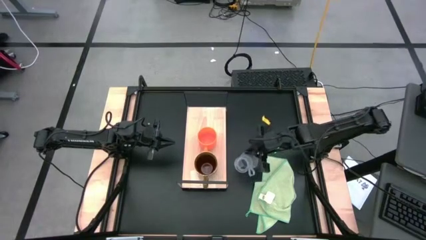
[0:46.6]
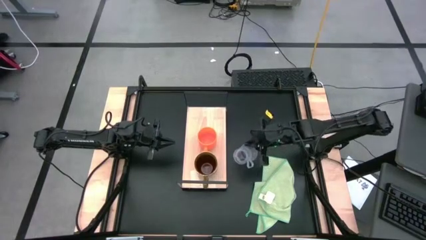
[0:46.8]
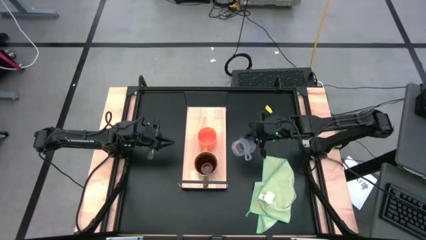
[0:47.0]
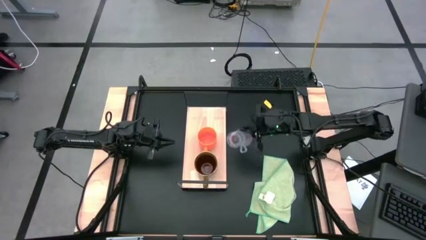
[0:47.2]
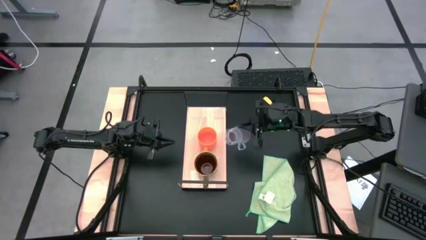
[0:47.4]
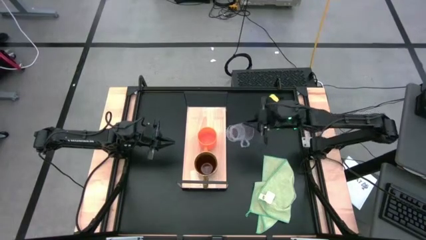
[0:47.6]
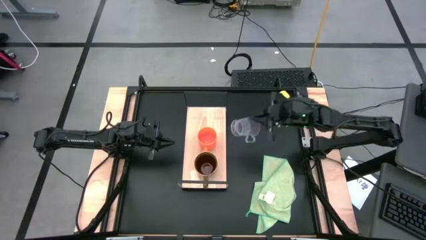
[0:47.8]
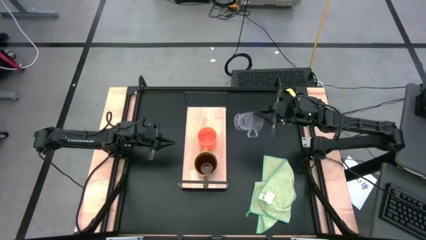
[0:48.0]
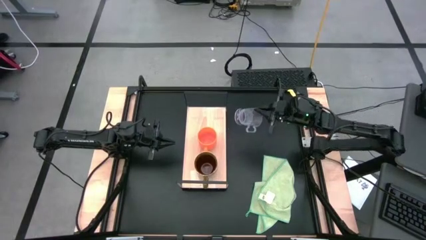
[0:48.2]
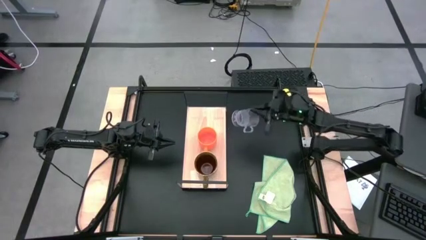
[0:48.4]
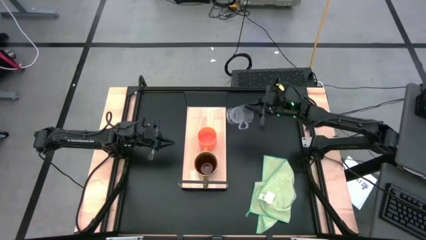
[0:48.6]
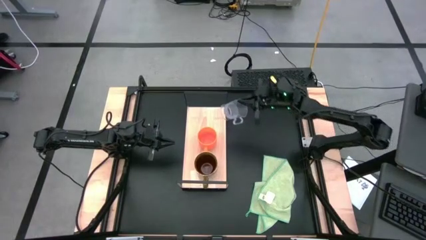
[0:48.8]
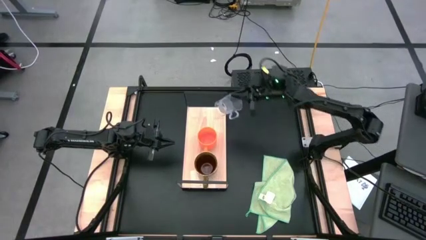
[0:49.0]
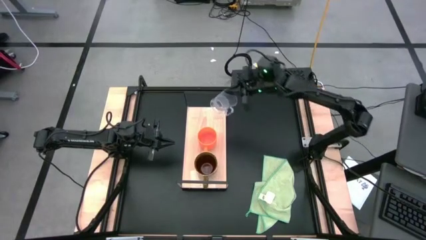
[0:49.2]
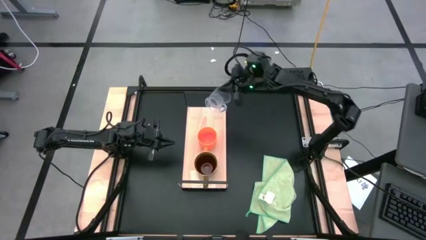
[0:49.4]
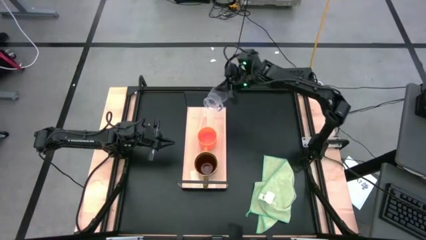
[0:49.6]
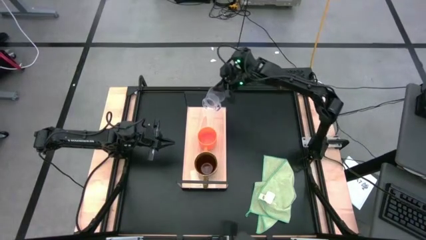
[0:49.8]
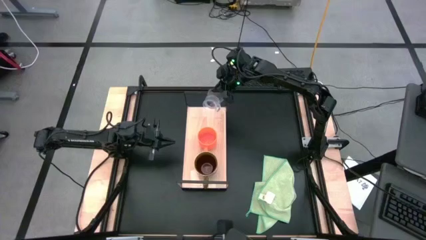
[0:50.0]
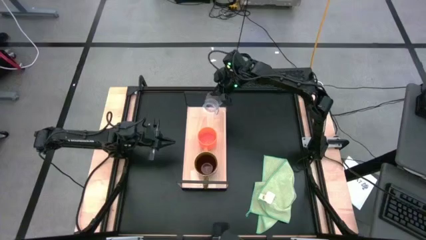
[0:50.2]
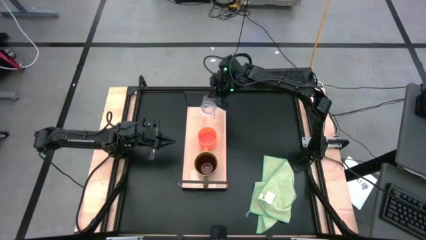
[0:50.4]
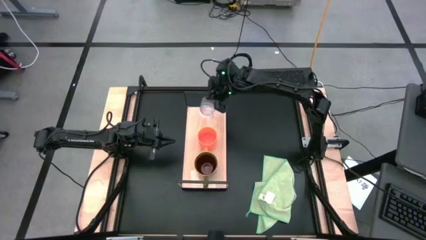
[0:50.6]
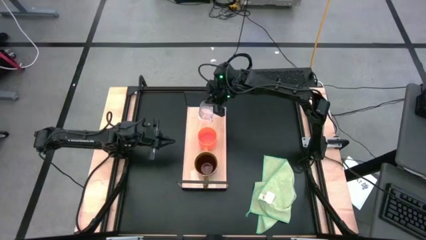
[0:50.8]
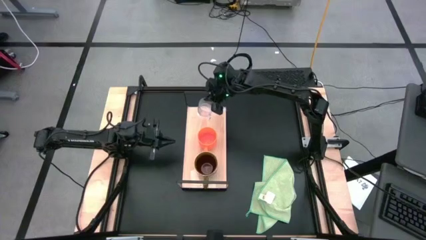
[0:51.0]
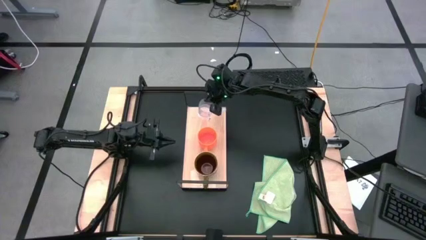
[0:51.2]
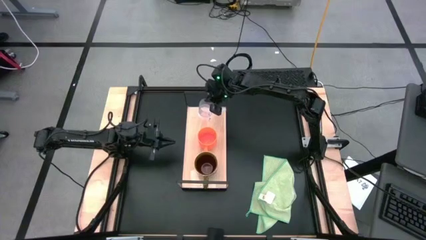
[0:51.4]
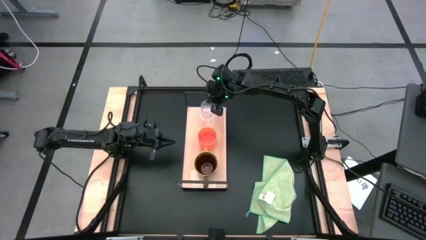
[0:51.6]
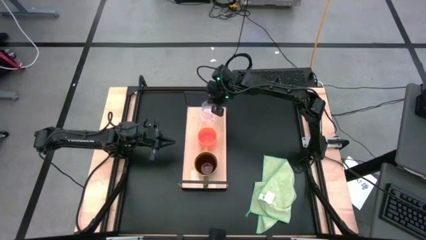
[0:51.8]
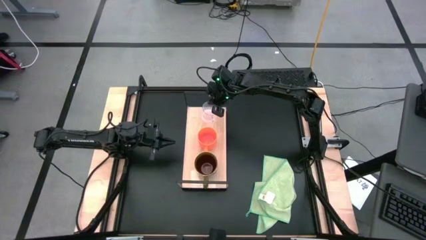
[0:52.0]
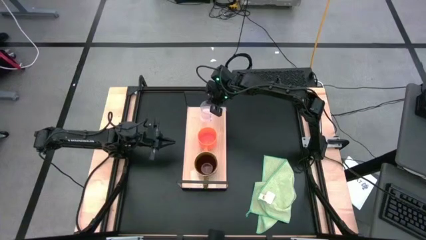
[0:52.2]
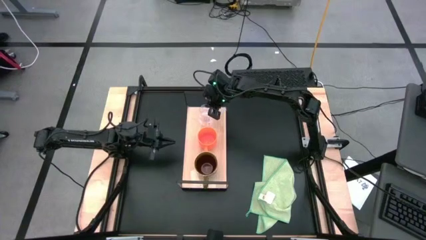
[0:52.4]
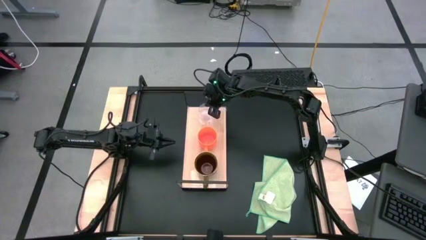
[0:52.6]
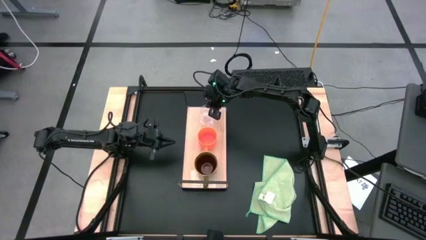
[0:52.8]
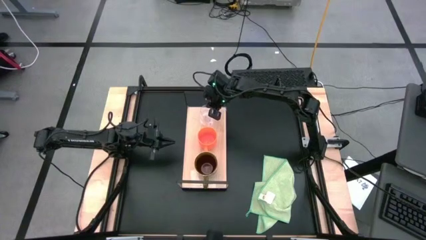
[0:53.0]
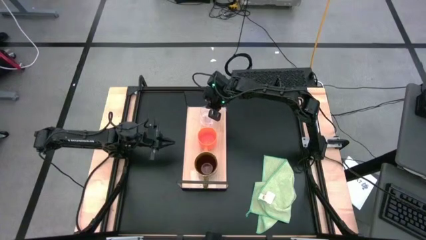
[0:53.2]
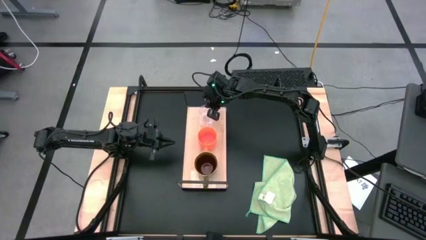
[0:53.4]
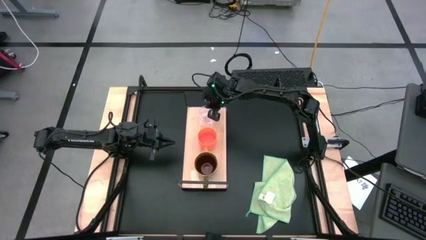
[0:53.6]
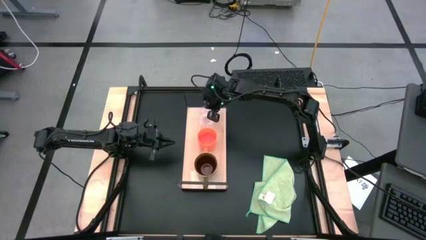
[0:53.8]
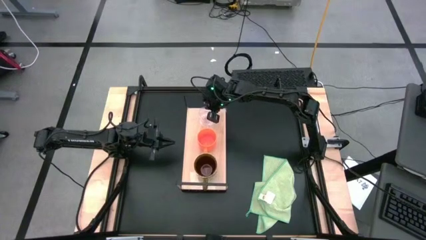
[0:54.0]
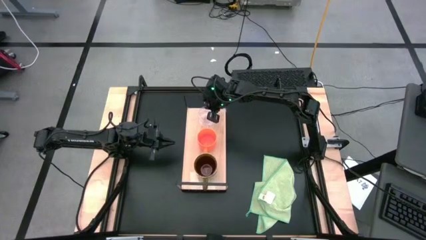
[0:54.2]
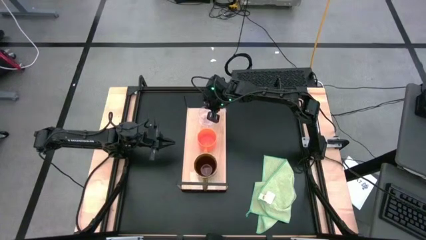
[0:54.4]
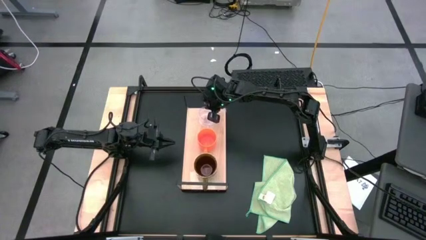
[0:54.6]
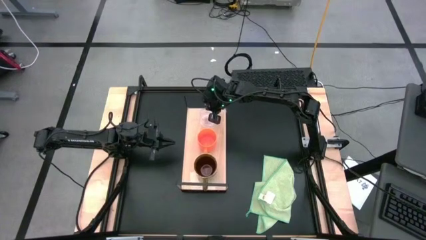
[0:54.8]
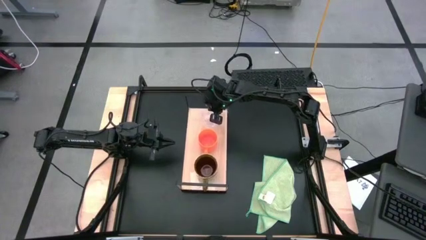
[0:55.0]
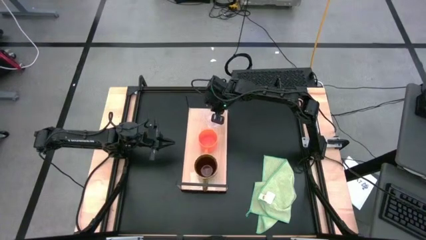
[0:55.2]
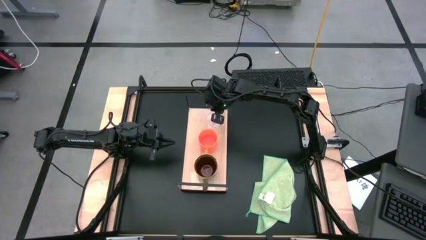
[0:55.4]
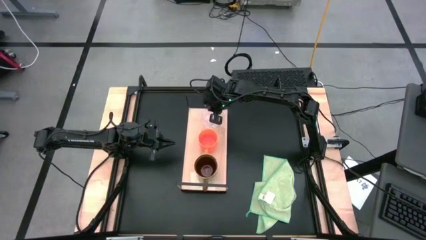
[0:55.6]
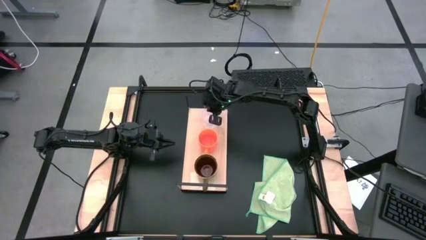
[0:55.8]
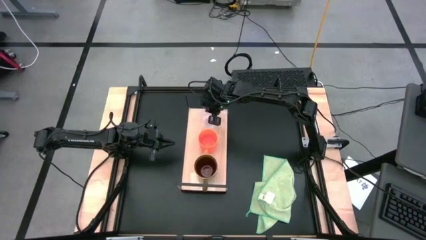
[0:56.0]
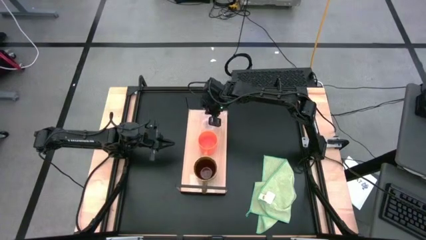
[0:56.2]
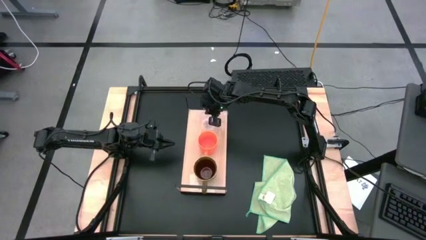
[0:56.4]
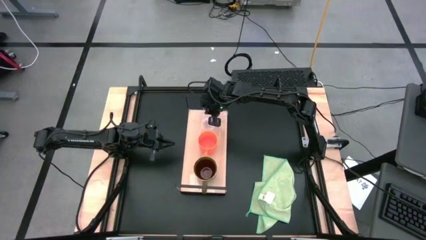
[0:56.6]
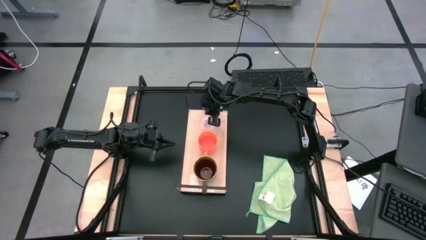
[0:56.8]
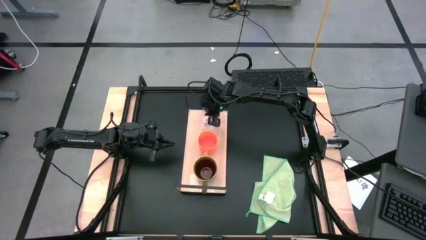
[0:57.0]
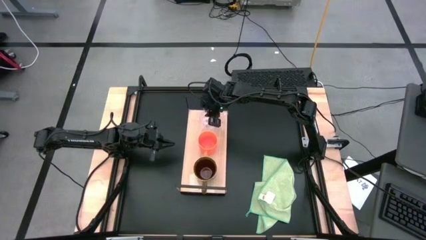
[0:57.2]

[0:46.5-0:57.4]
Task: Stack small to large cups/mugs on shelf
Put the transparent mug on the shelf

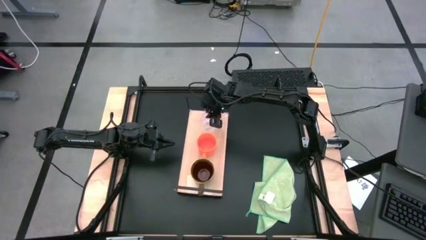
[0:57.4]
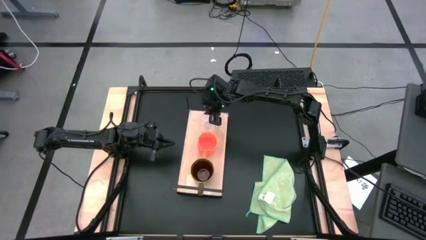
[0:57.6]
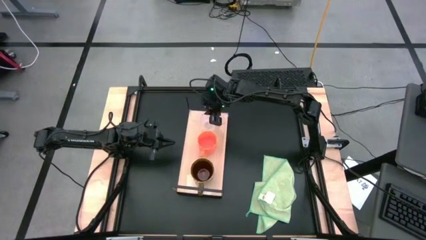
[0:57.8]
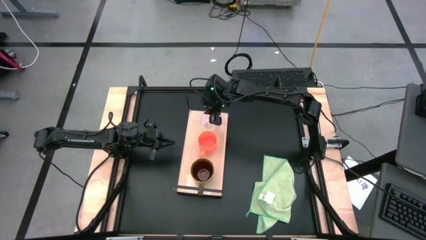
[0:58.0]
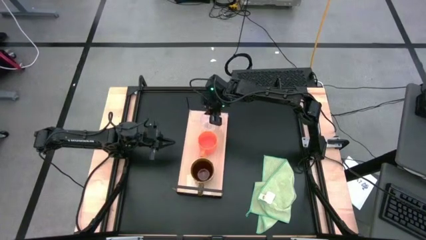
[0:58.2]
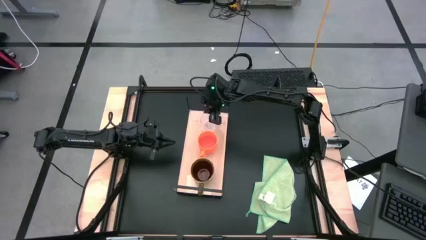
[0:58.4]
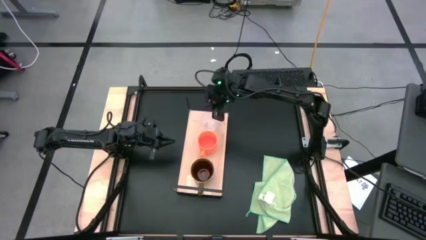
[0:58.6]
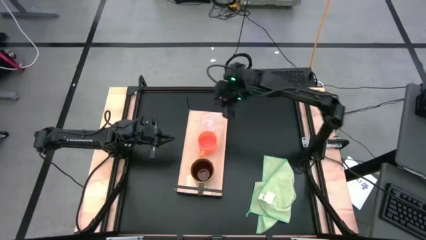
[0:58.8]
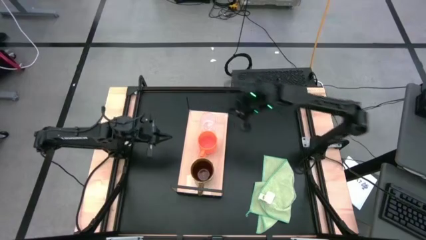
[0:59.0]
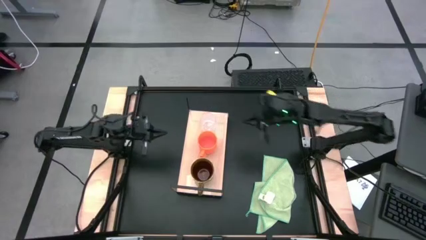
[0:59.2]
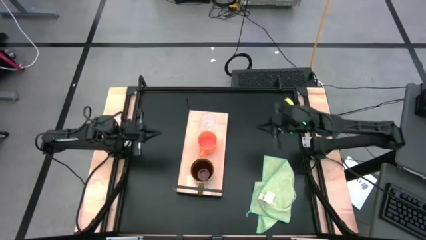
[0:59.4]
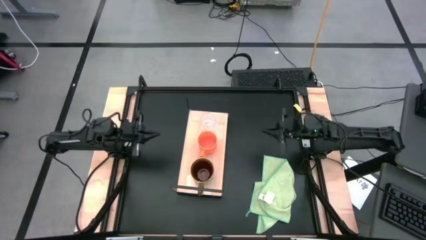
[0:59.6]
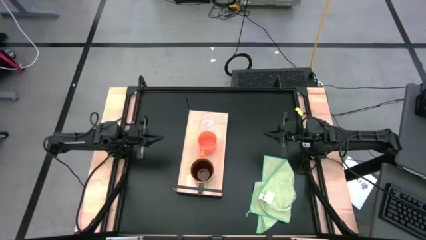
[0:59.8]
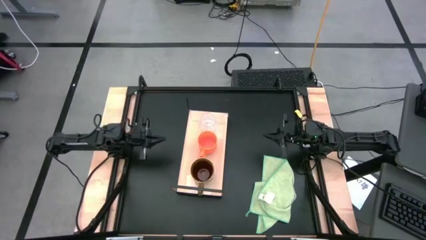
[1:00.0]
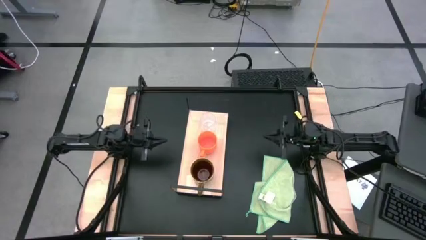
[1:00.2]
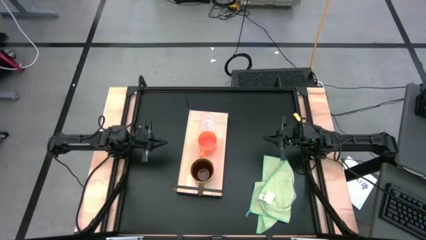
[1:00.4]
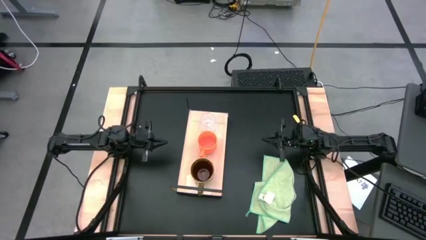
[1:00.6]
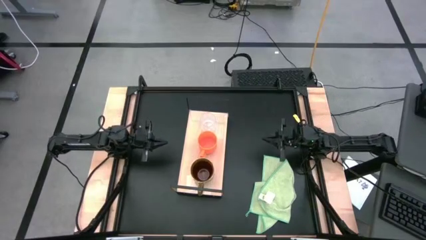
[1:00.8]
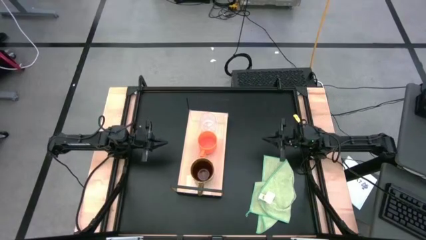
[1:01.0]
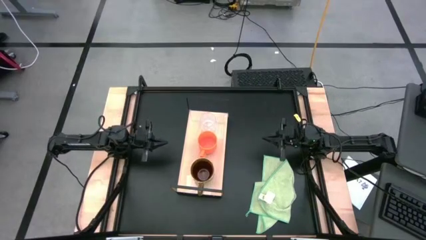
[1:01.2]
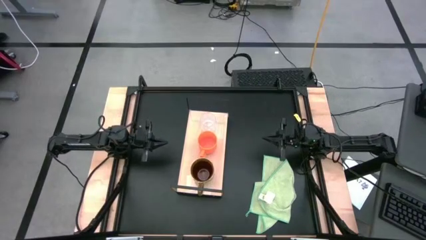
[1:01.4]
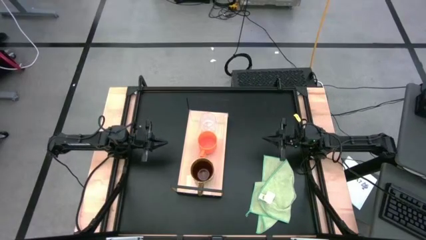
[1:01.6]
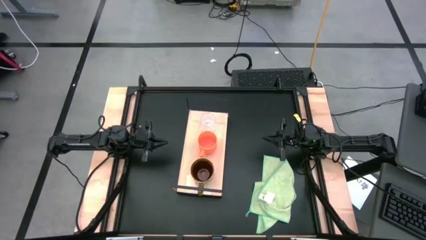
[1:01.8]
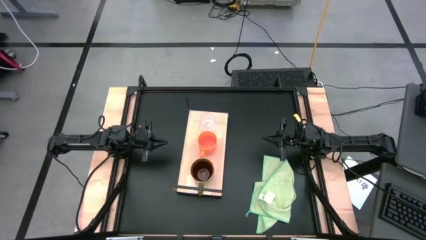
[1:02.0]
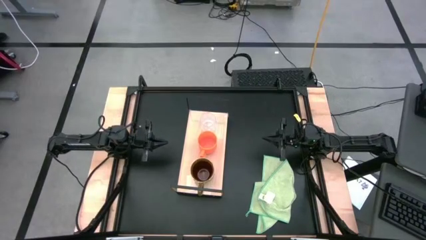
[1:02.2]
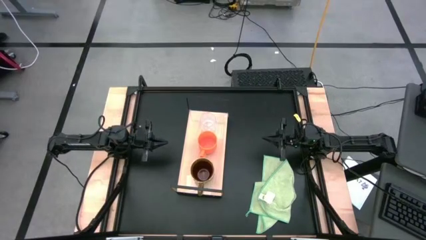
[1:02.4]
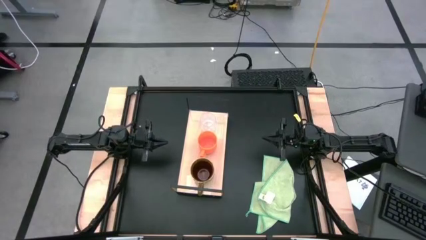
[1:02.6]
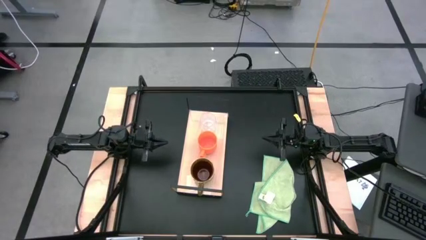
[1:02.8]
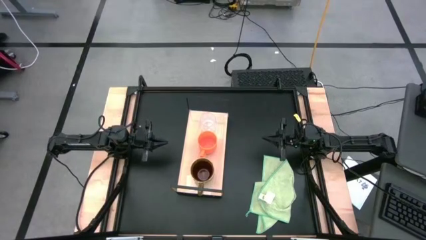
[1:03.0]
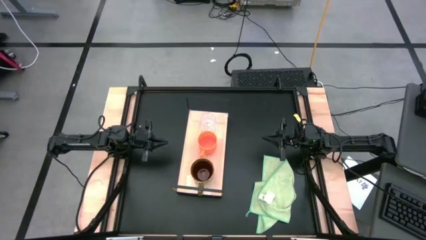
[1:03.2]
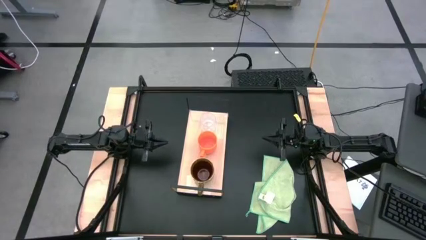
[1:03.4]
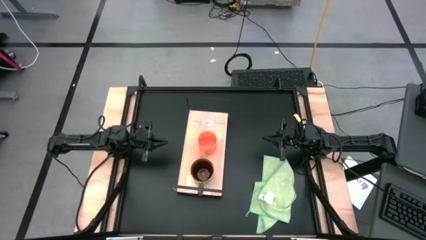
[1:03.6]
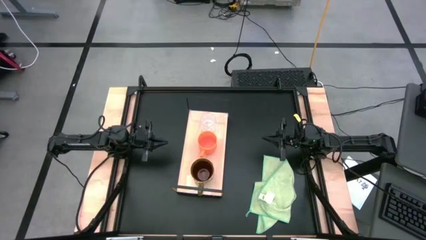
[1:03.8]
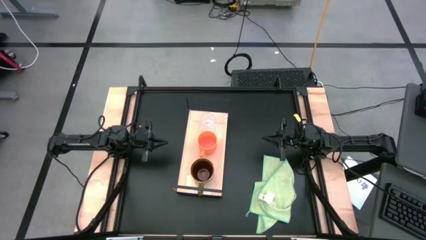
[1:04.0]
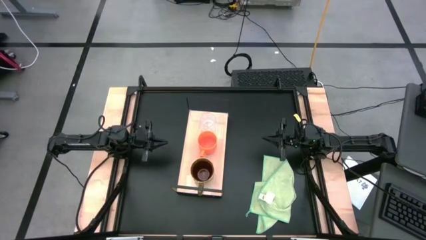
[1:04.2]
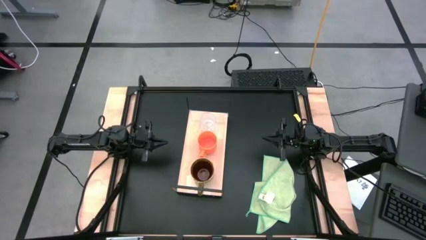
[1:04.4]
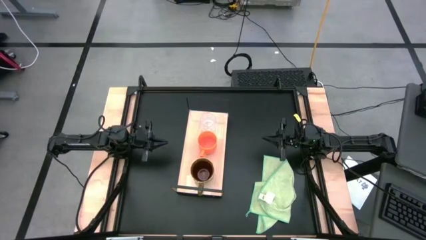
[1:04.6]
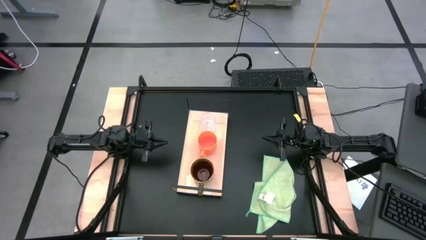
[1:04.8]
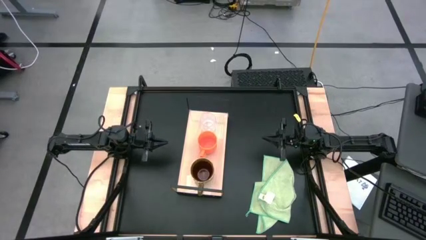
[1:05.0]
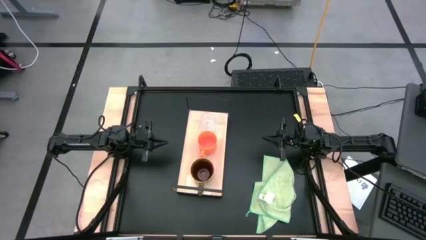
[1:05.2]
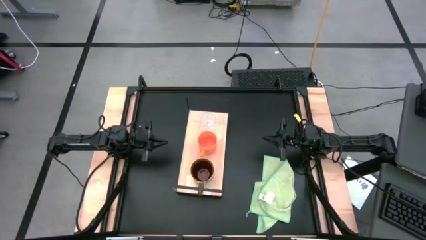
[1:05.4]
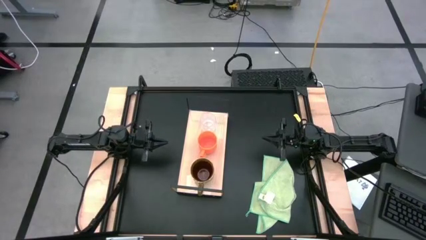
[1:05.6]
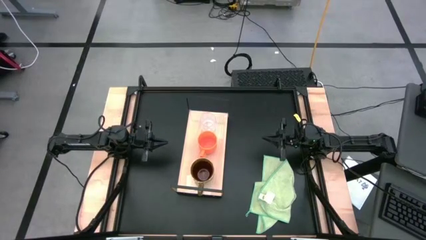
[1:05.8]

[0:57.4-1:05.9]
Return to Home Position
